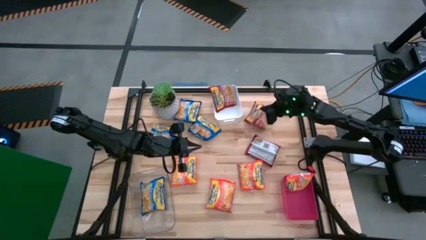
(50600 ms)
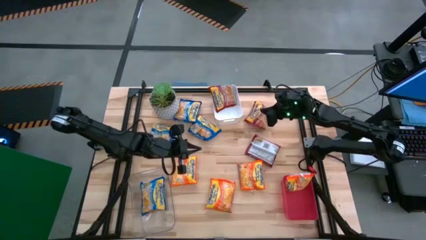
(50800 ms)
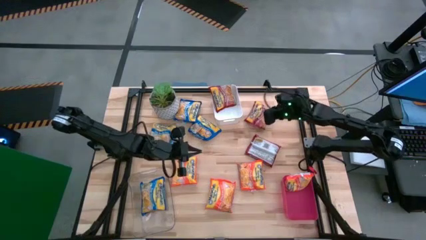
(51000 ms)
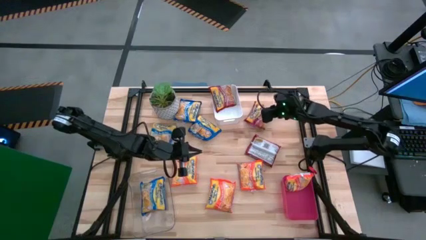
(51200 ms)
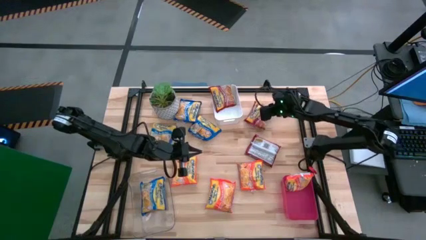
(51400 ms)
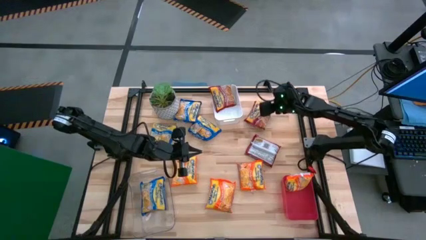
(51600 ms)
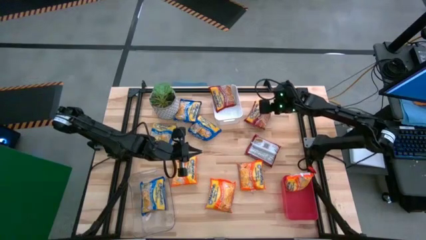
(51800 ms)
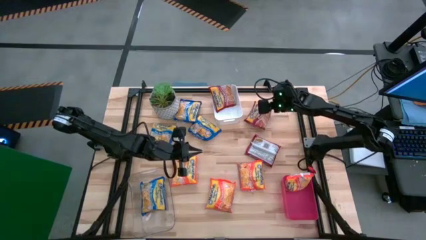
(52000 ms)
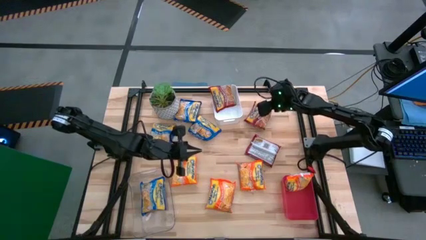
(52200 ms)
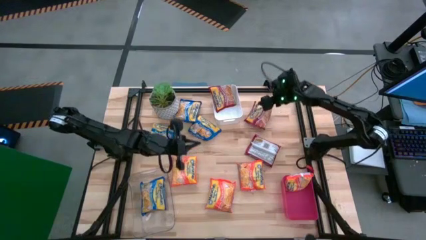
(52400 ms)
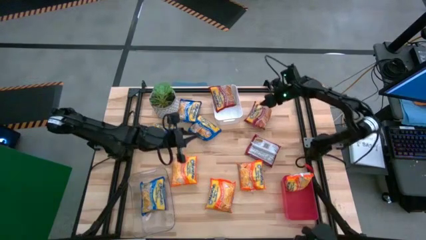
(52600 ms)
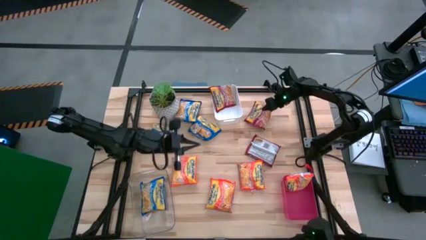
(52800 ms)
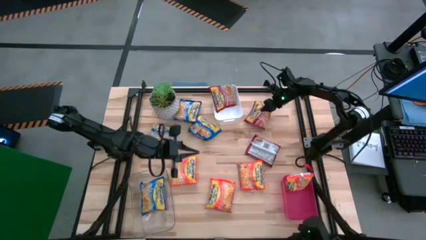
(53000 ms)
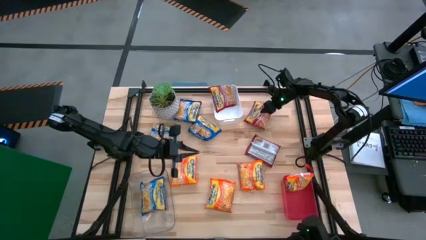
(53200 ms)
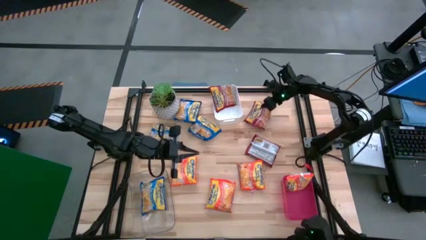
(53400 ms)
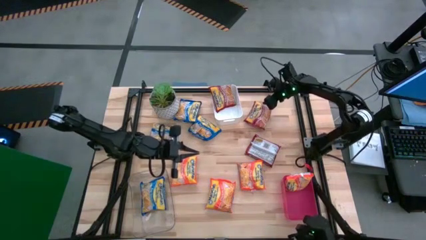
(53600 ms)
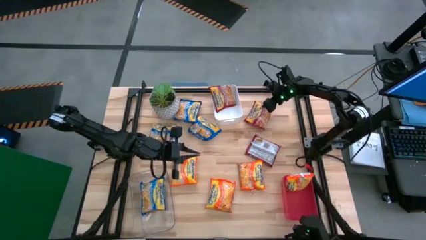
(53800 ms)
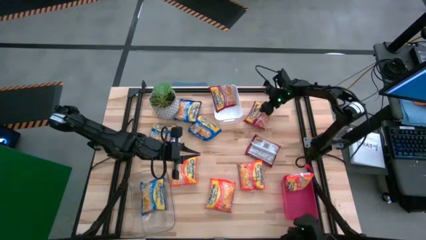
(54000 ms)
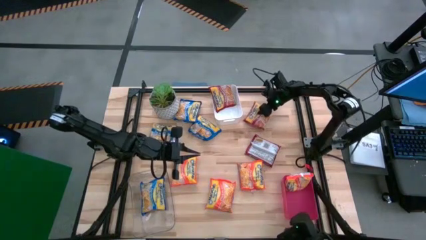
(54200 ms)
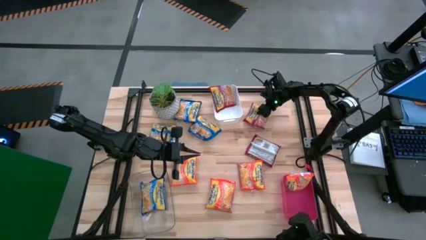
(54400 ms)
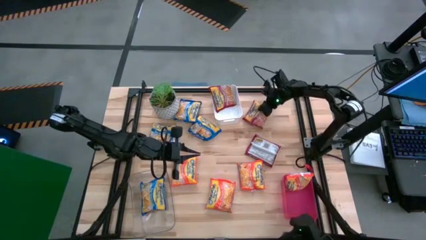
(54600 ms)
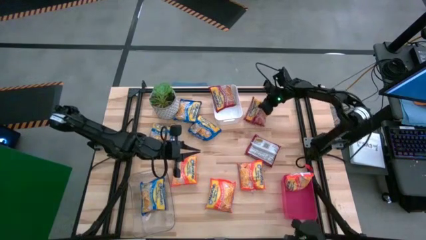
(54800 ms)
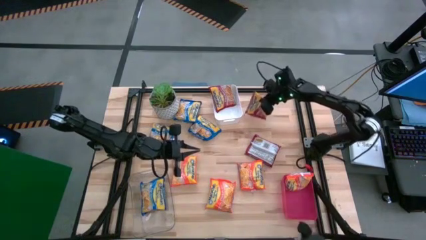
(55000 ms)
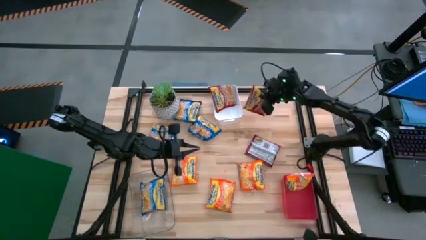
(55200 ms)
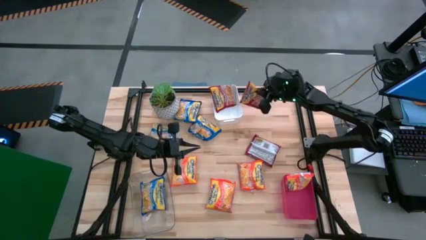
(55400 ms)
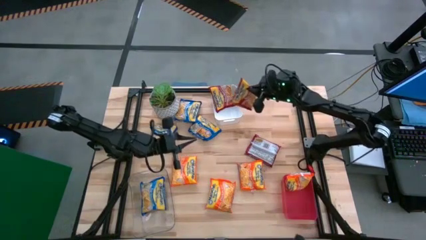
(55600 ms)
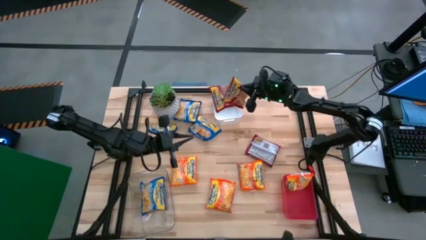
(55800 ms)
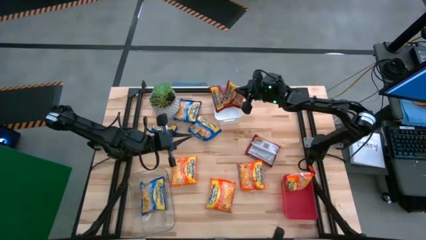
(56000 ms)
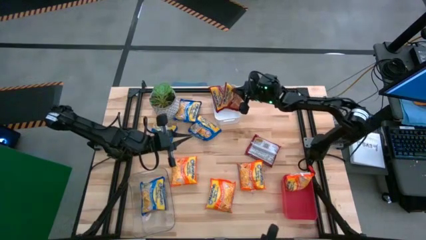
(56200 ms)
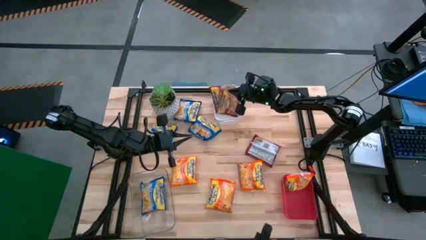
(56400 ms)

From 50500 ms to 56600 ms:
Task: Sort Maruchan noodles
Put the top red noodle pack into the white bin

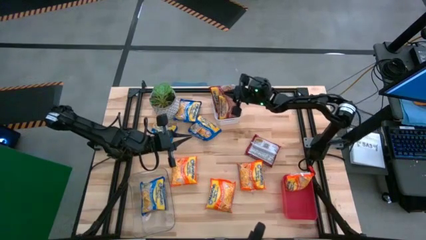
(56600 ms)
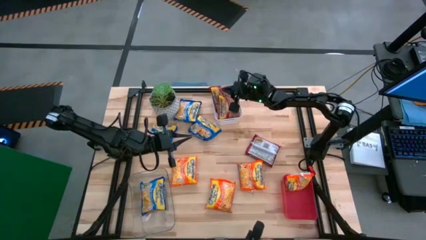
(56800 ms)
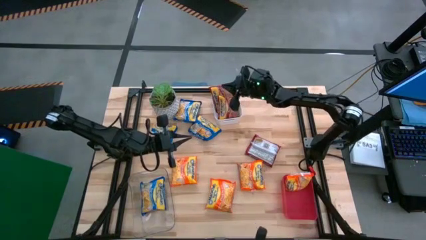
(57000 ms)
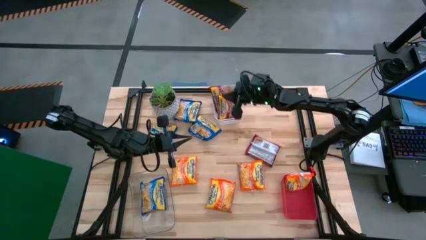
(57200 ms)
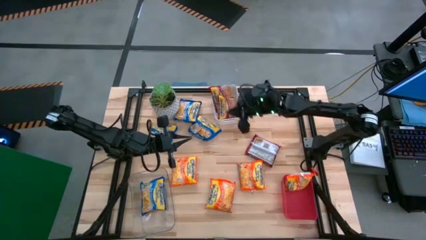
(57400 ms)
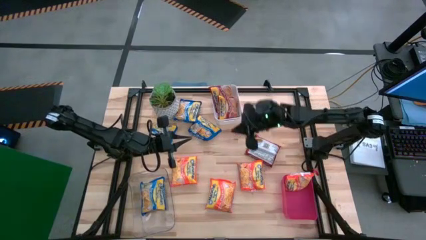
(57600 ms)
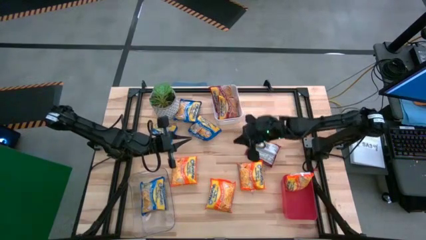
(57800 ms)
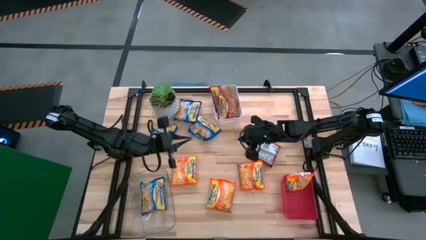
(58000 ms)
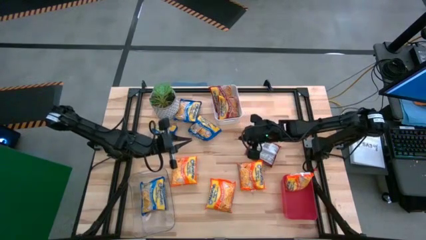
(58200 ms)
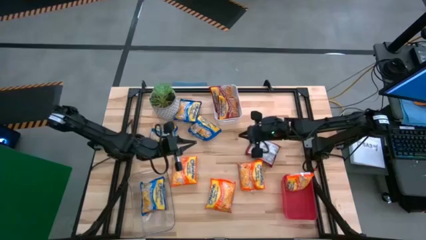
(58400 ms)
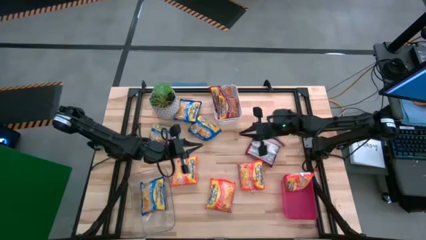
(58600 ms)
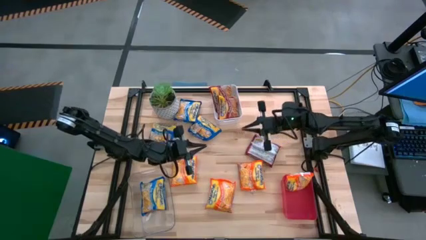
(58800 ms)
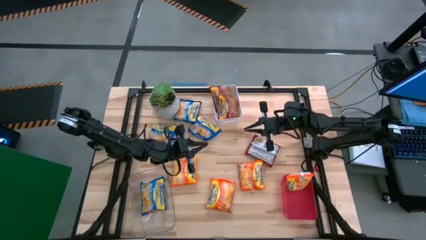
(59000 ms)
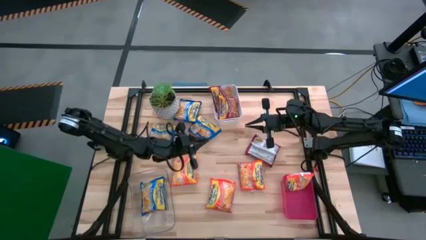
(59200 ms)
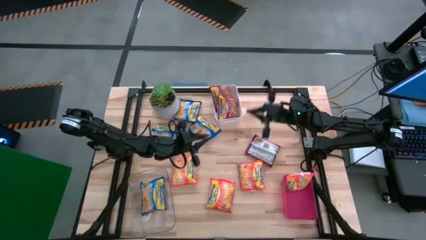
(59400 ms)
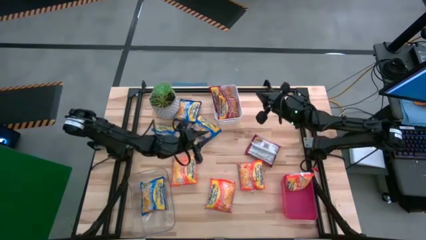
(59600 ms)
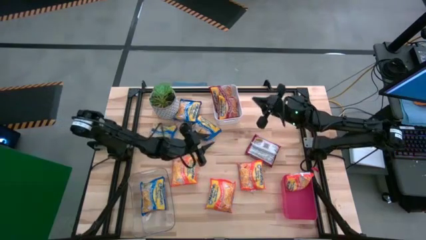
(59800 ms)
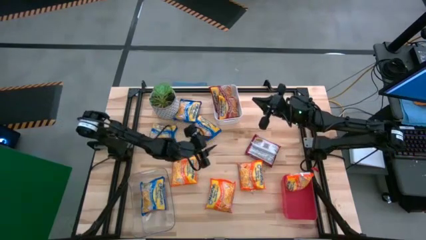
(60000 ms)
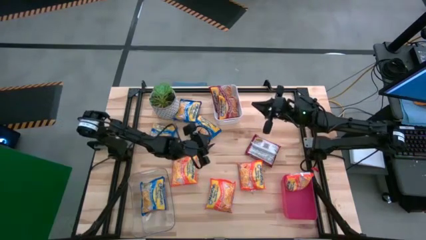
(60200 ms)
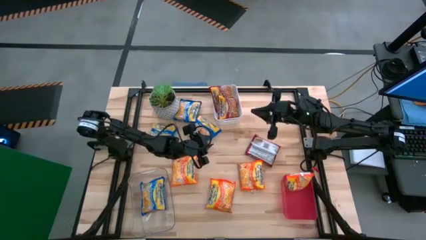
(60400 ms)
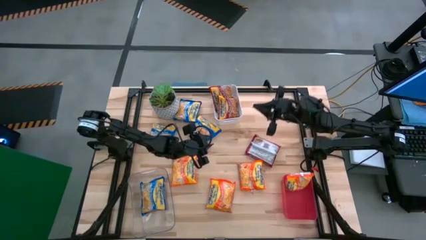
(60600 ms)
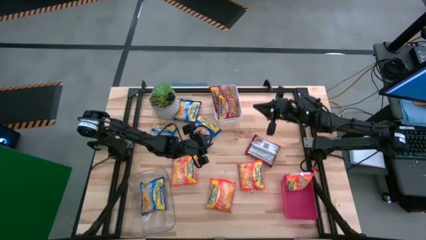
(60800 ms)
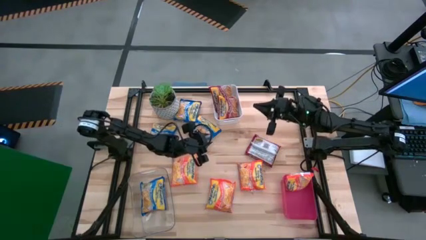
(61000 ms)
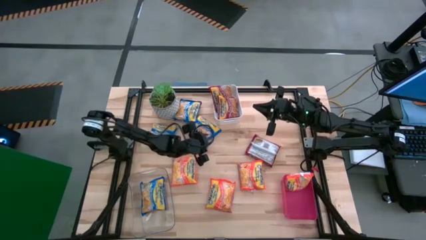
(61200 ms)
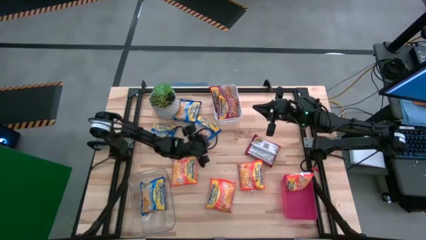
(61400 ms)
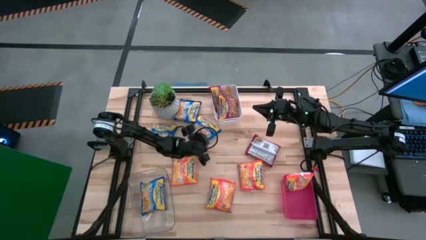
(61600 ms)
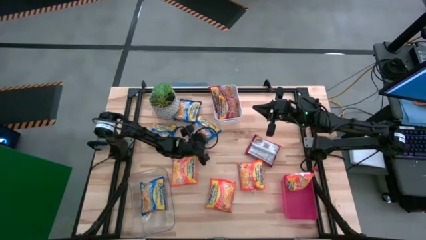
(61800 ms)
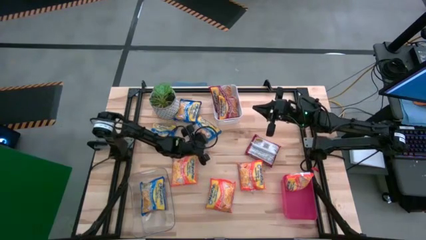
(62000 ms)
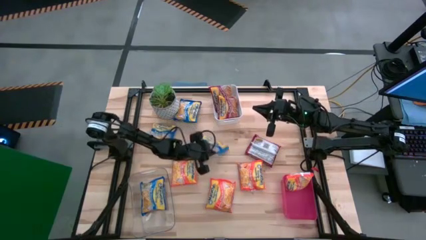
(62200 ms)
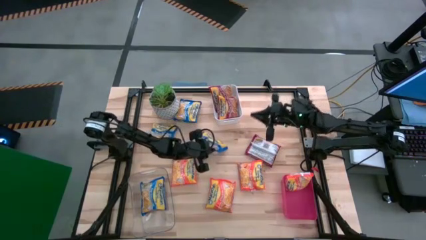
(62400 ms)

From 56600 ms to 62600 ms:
Put the right blue noodle pack into the transparent bin

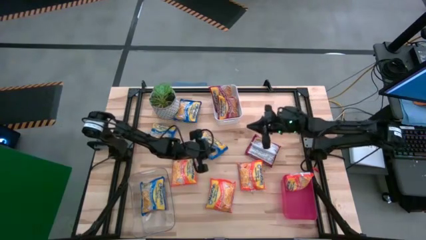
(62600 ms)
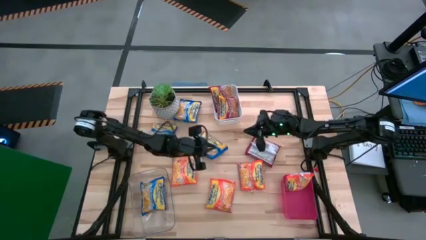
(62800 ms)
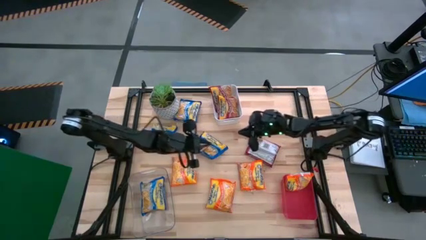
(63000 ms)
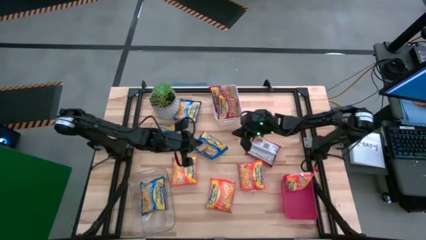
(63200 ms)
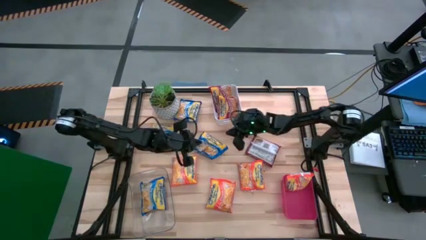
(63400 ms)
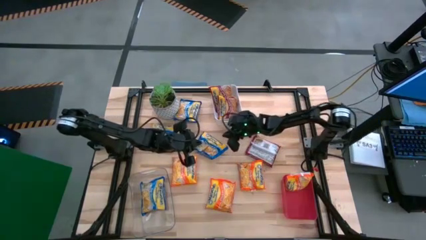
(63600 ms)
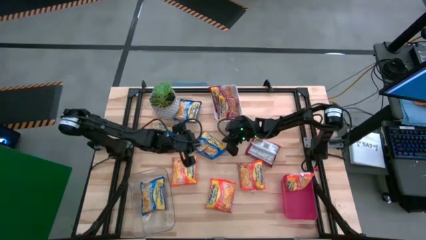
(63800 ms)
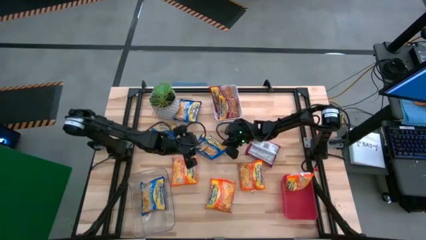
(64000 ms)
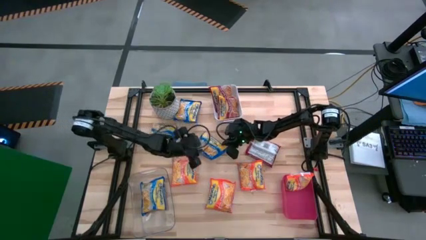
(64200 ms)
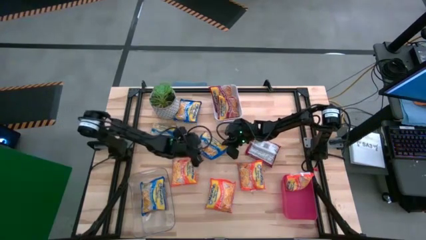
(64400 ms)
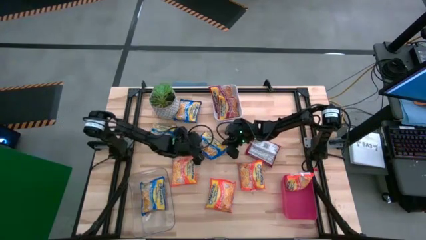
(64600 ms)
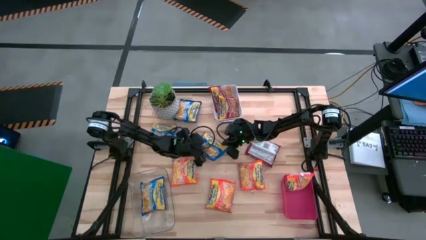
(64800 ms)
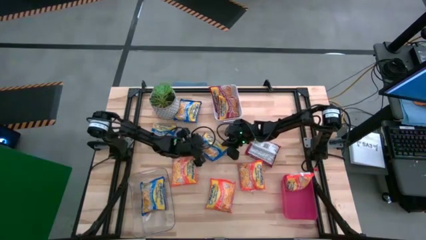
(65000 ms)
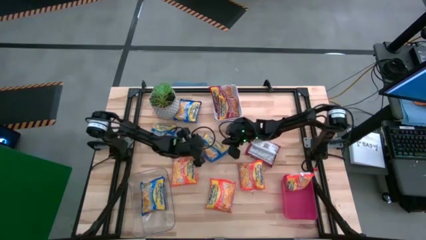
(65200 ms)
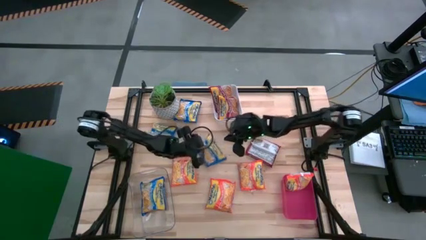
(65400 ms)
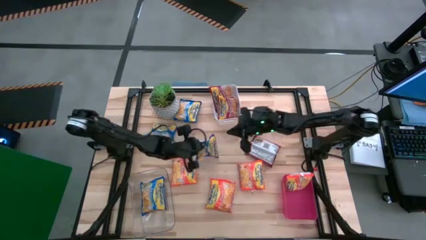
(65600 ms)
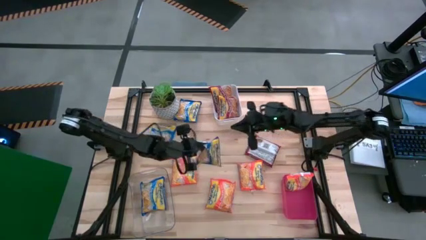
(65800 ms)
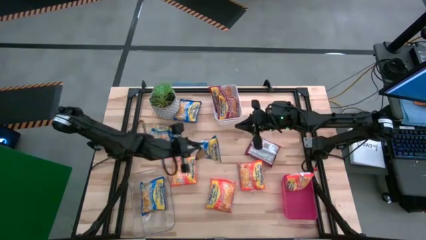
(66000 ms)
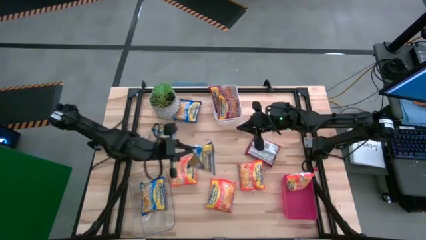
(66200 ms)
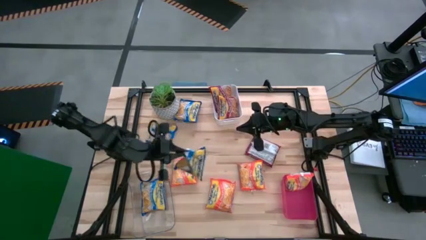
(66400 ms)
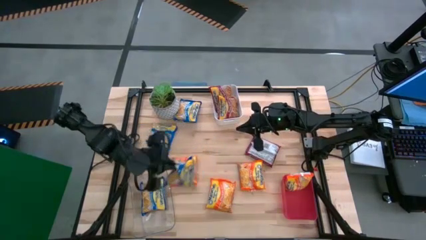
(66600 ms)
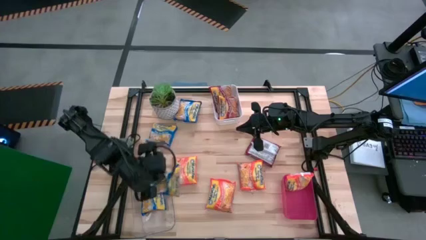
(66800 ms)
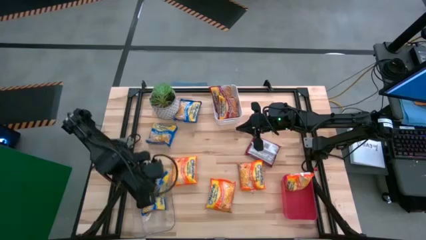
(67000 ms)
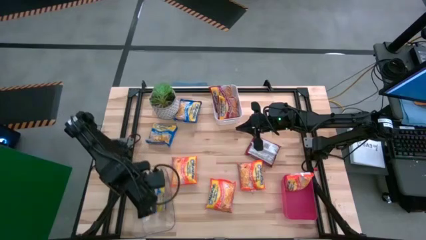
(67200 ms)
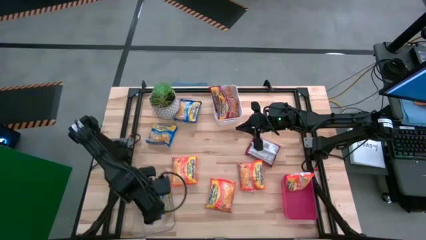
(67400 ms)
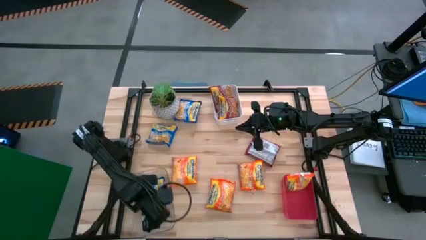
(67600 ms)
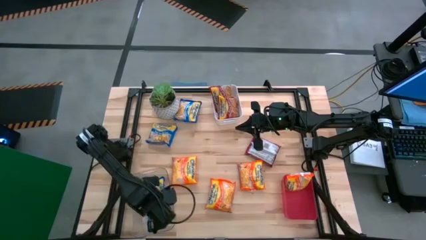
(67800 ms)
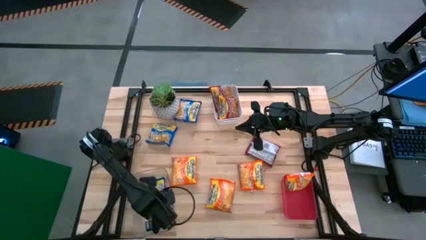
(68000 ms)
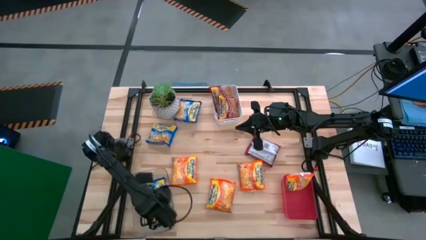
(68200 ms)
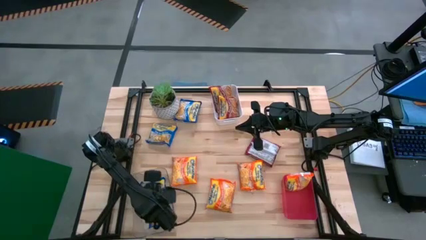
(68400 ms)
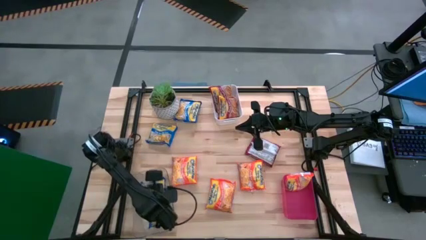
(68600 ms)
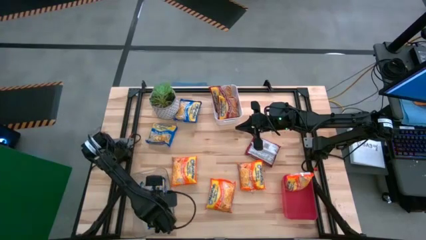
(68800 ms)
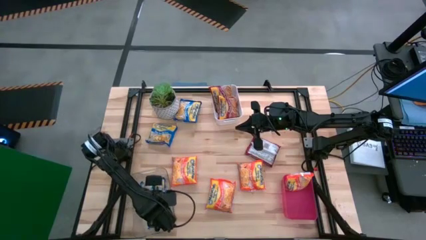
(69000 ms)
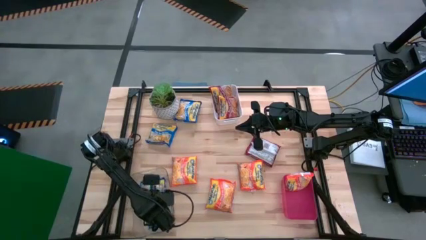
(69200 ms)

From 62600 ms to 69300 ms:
Put the right blue noodle pack into the transparent bin
